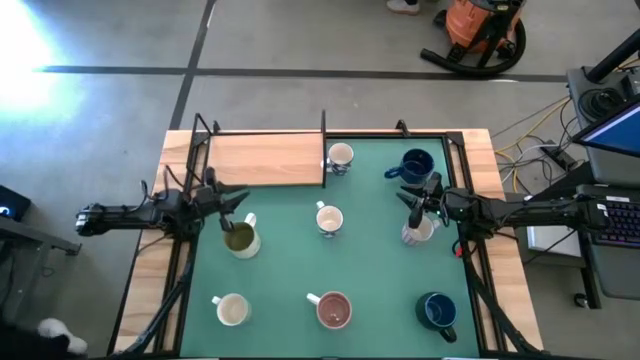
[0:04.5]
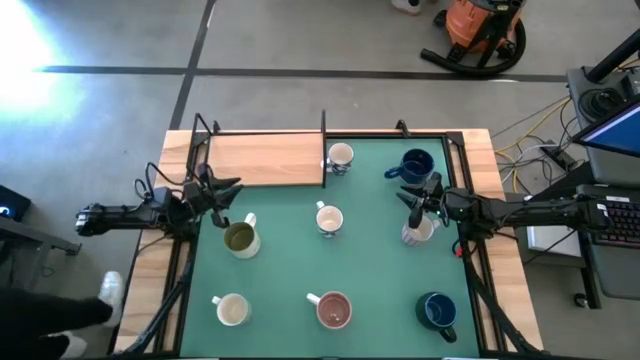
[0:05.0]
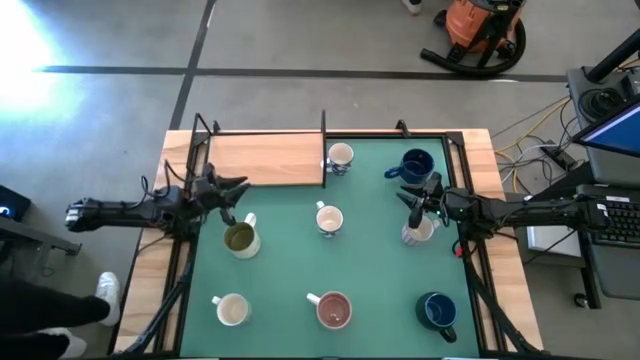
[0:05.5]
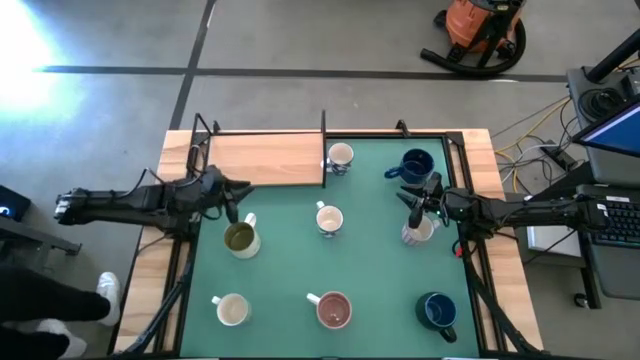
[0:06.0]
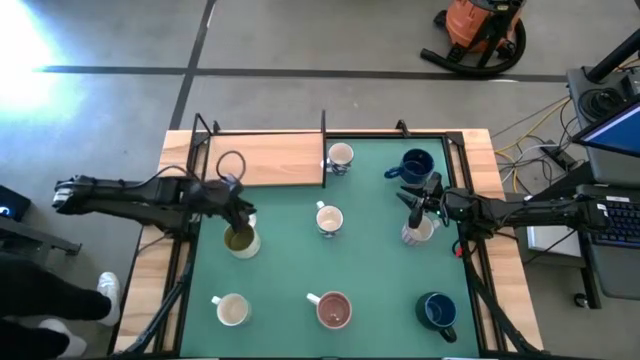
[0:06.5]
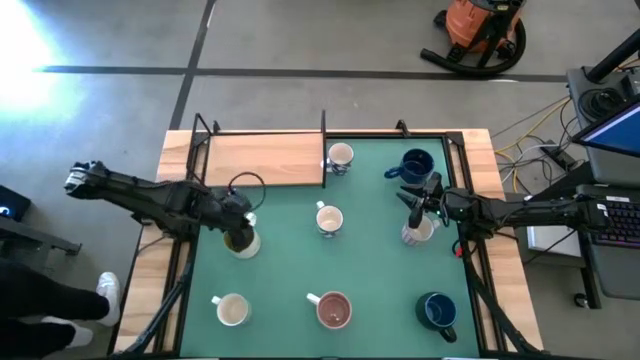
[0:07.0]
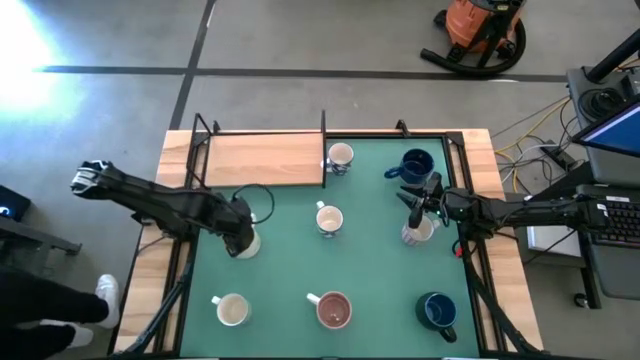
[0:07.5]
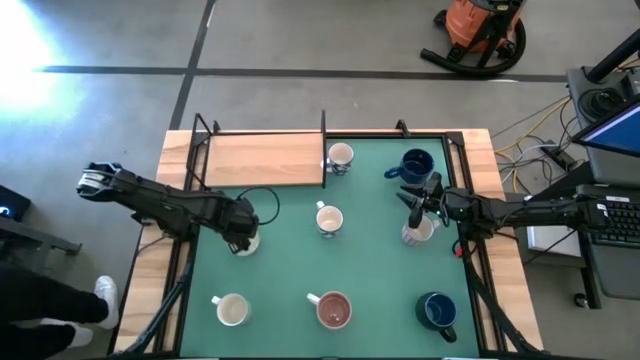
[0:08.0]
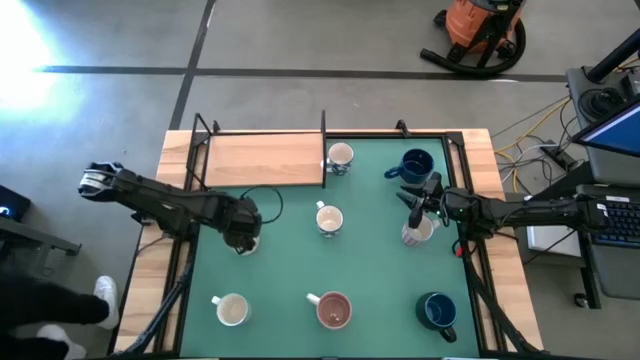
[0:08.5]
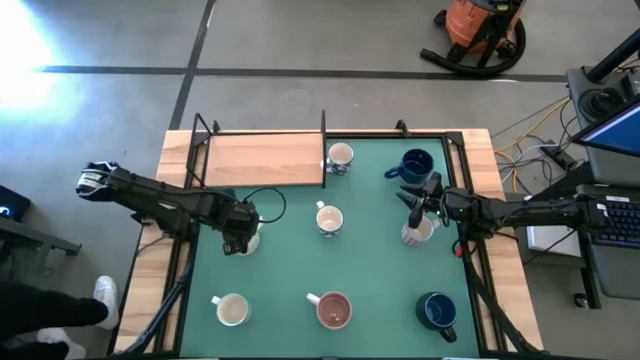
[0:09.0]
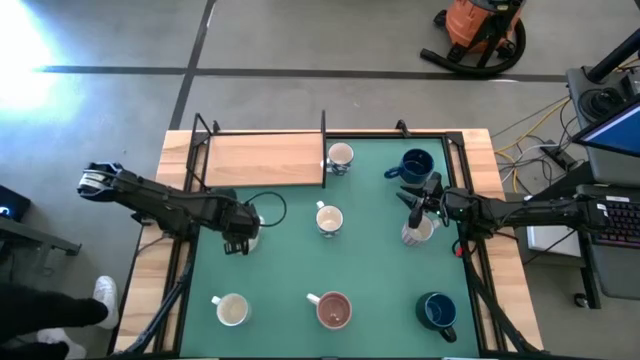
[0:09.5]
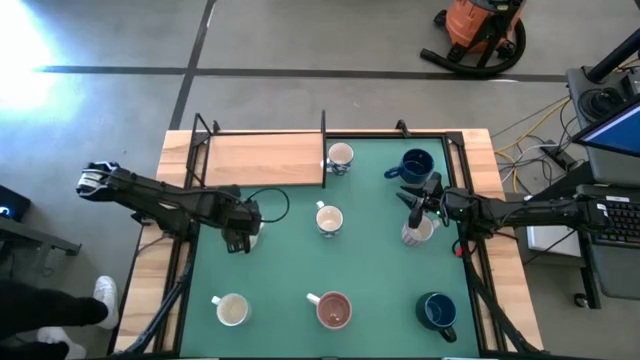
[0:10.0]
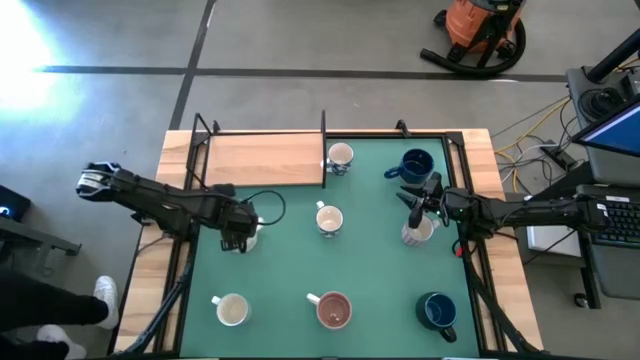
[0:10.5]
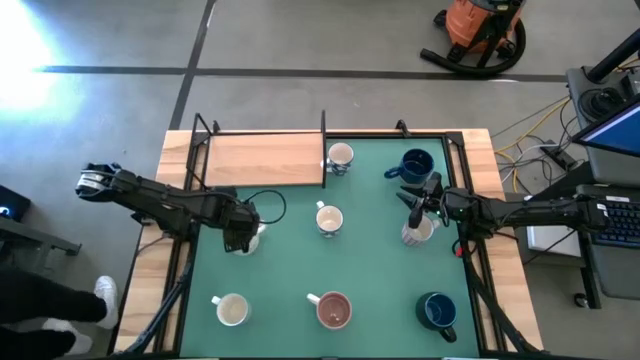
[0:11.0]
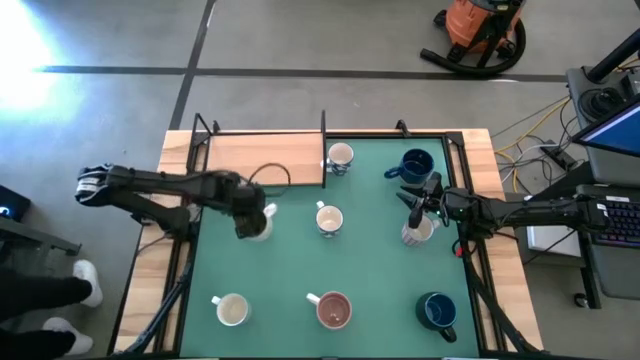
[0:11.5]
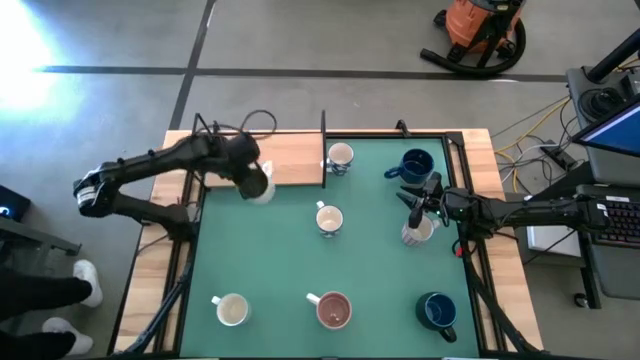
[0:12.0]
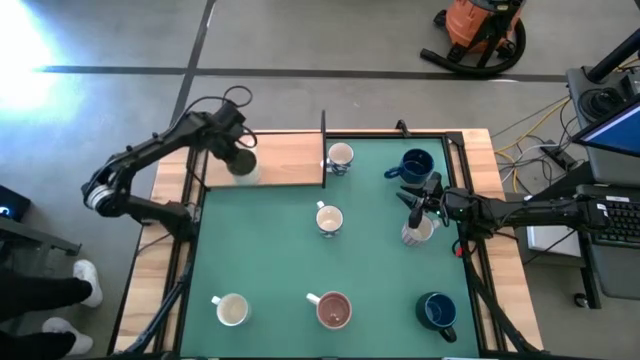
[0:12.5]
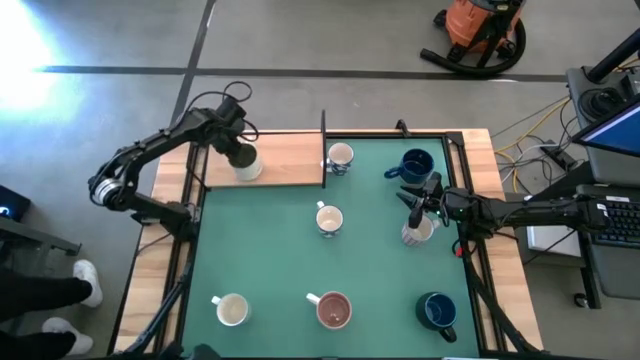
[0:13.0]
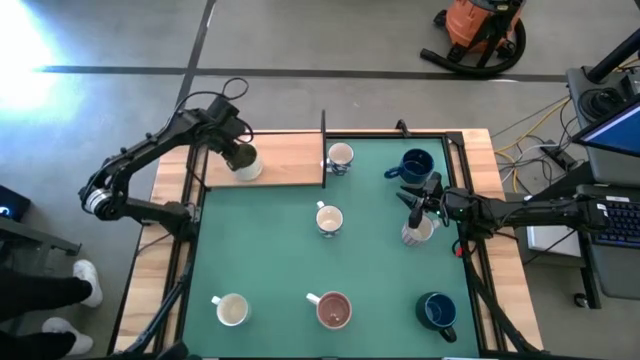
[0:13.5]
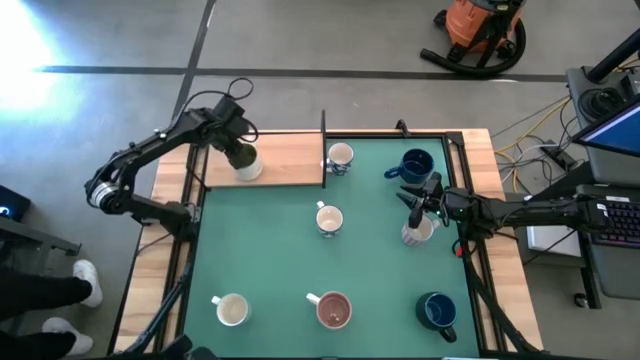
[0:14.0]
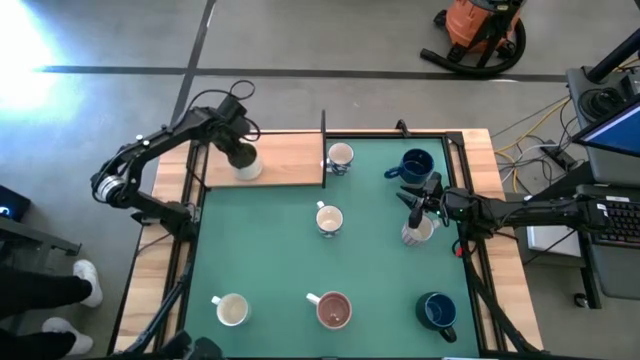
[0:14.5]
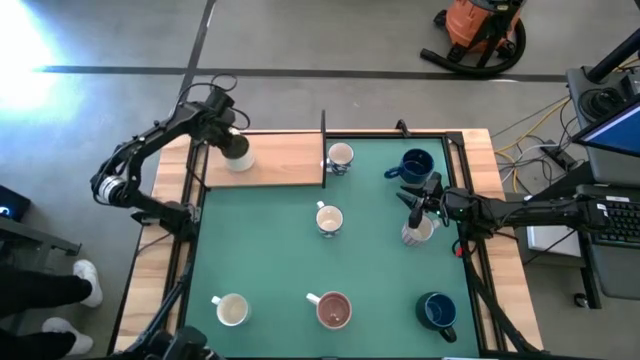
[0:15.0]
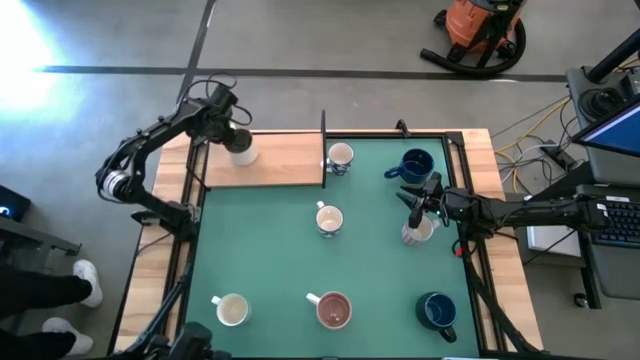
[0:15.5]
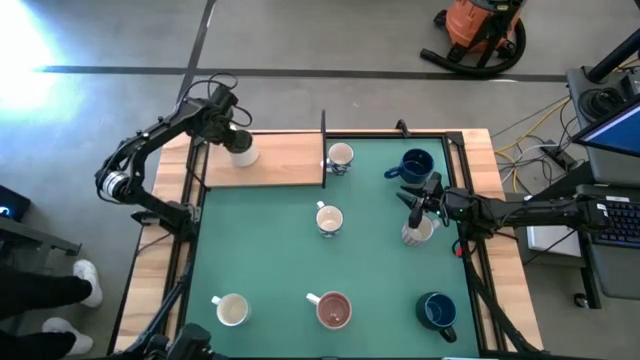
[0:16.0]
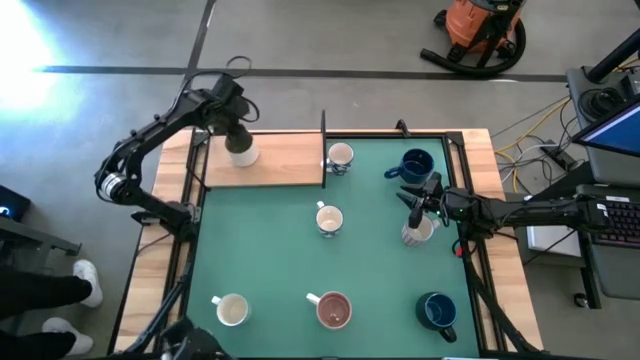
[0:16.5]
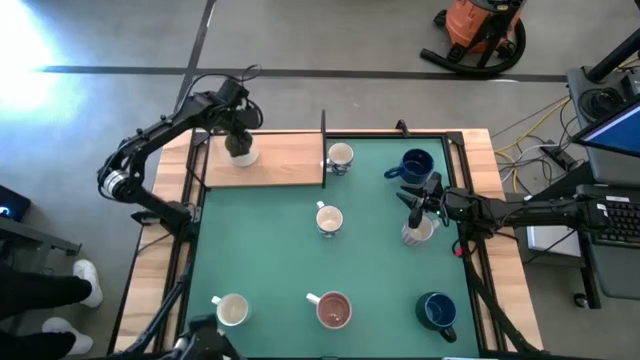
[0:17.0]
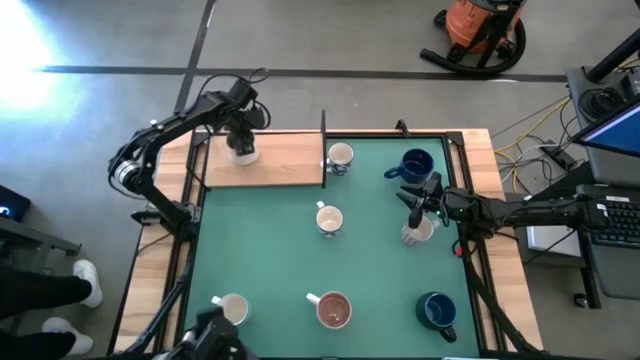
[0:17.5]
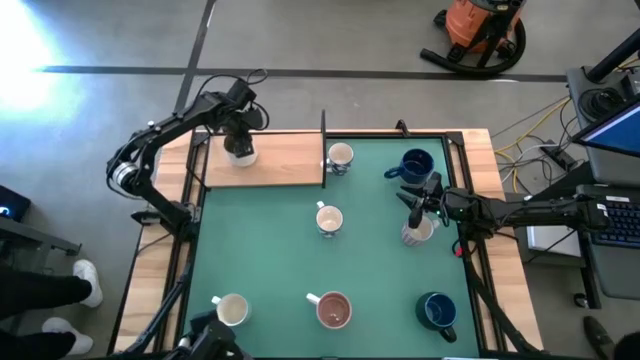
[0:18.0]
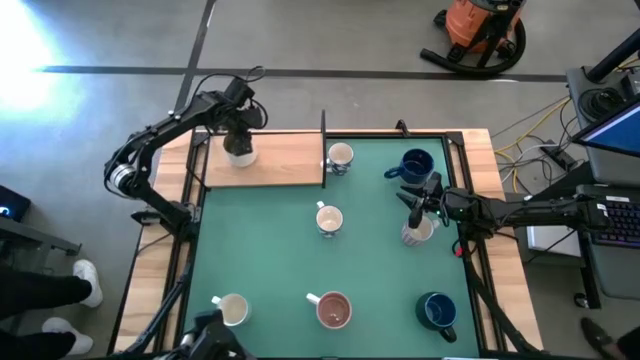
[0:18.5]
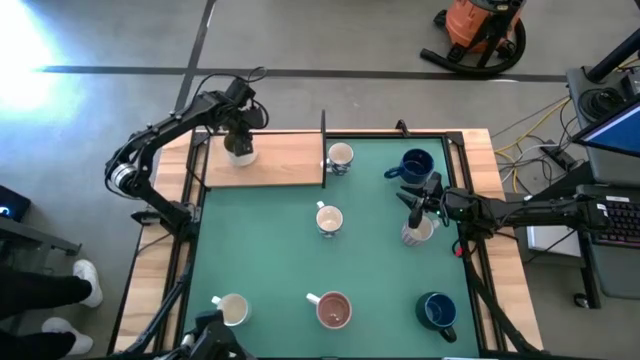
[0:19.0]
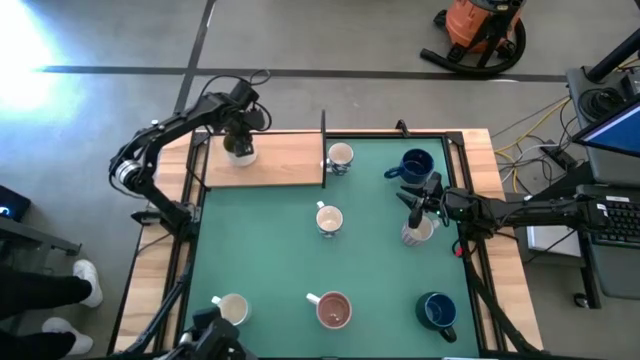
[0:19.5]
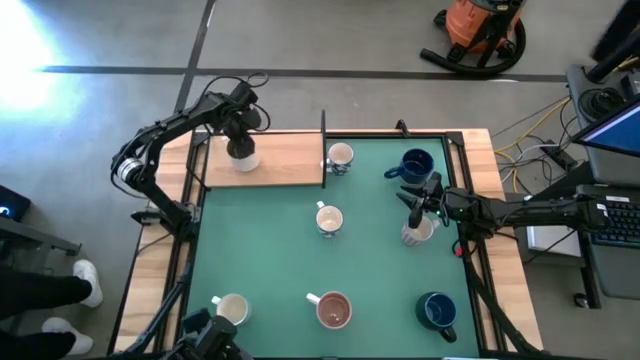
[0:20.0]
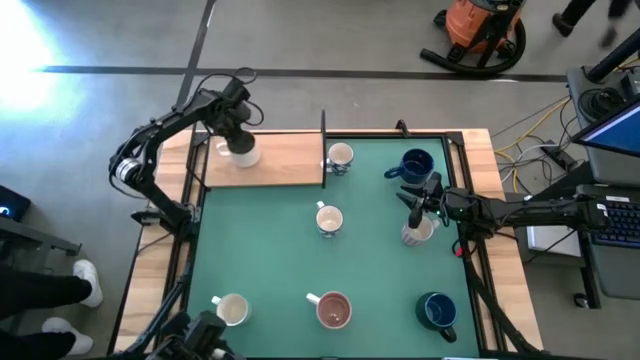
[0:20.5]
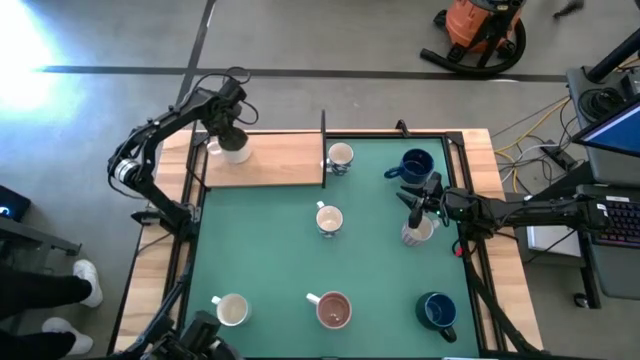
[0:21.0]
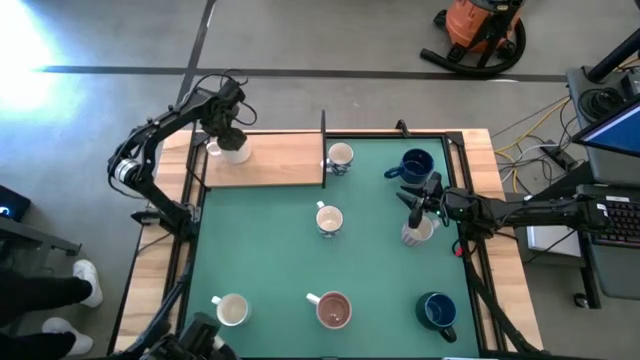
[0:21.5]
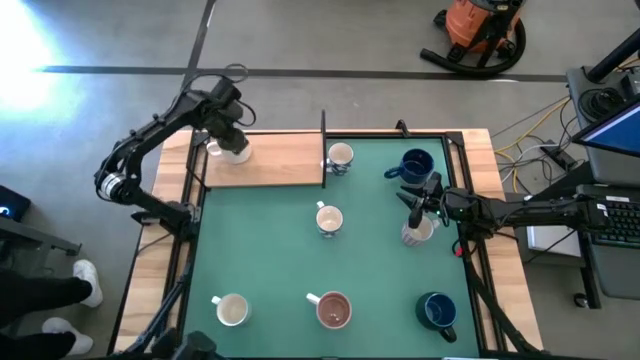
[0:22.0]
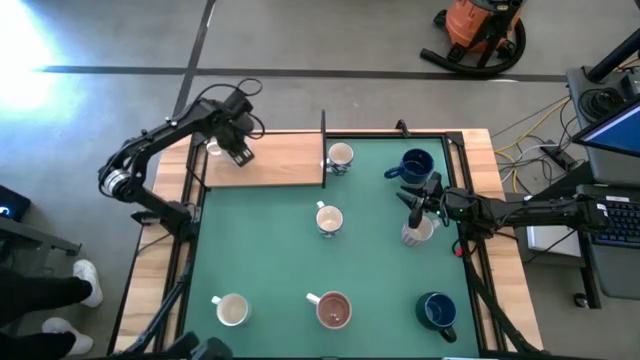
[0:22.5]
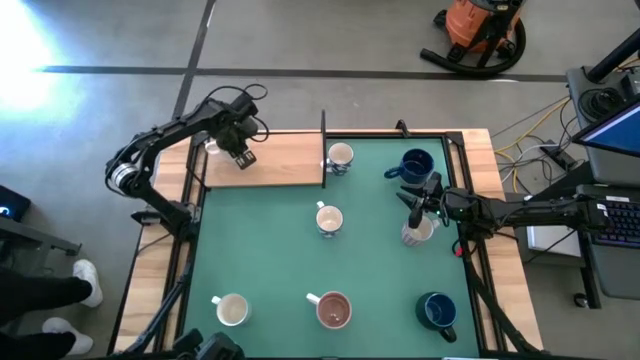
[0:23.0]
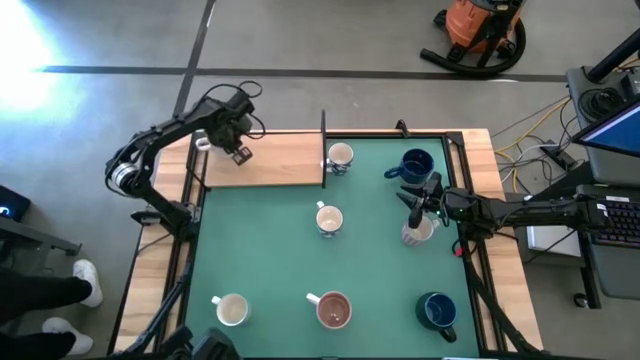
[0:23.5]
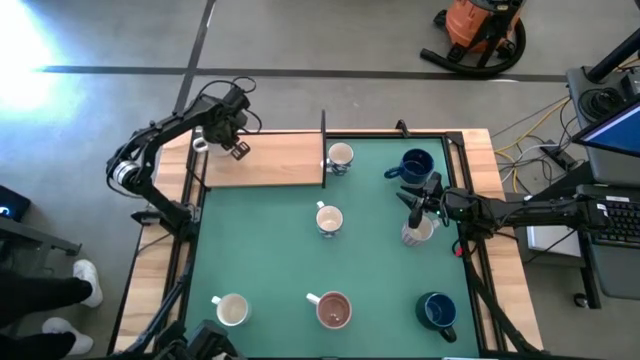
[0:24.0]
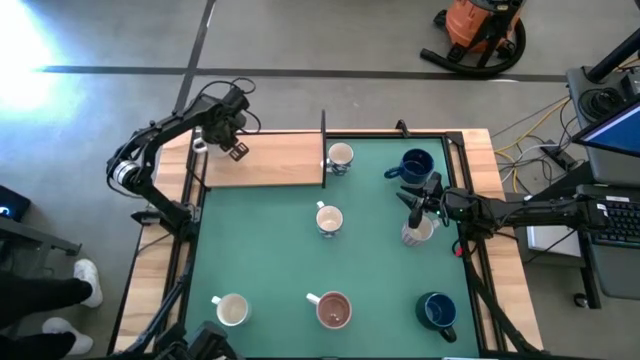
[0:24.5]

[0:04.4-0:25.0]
Task: Place coffee mugs
Put the white-green mug on the shelf
